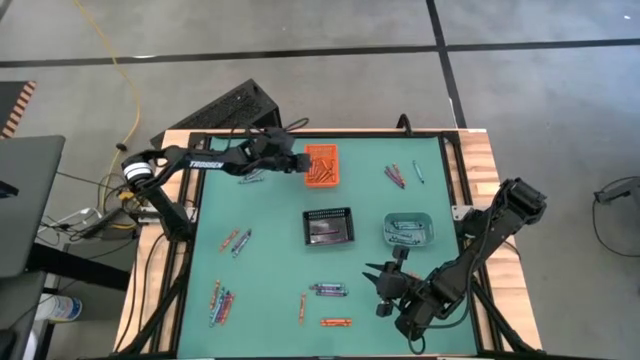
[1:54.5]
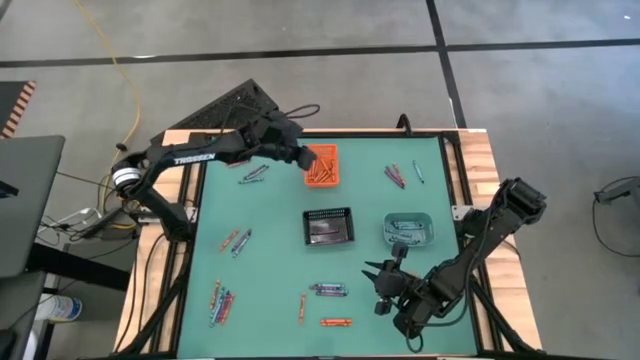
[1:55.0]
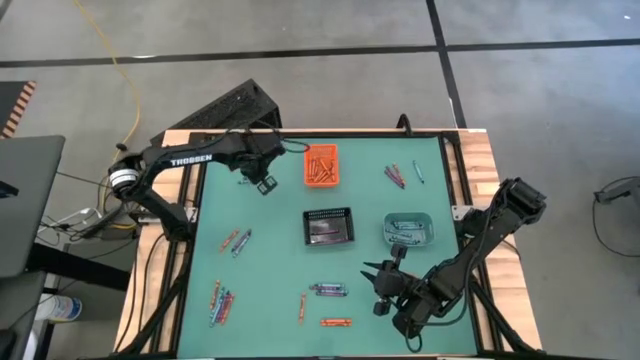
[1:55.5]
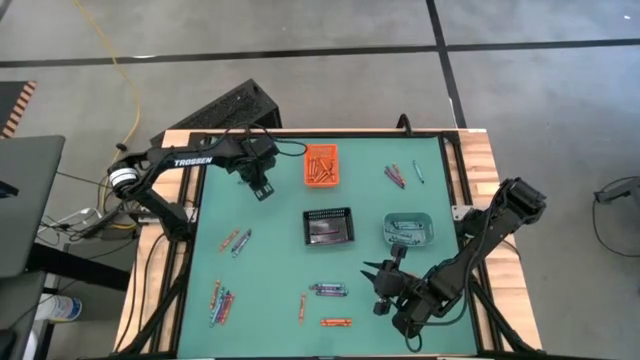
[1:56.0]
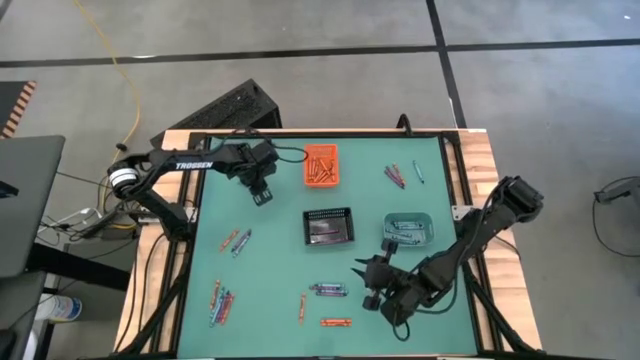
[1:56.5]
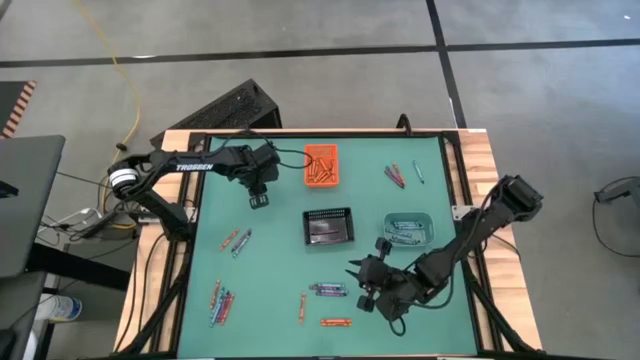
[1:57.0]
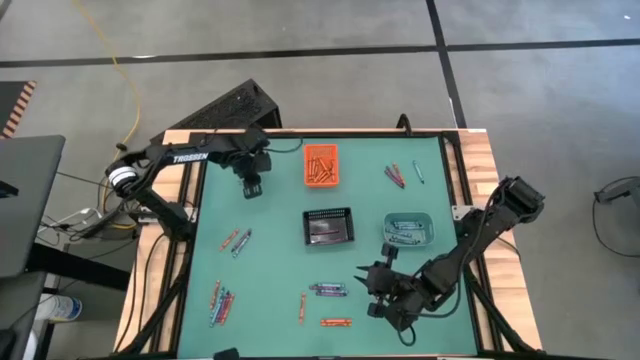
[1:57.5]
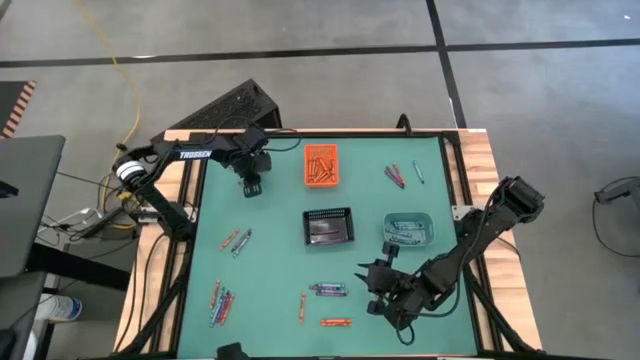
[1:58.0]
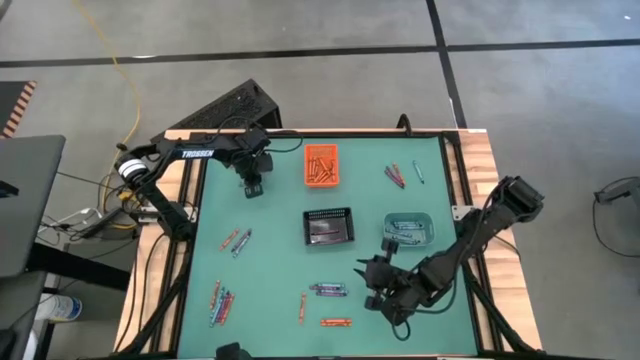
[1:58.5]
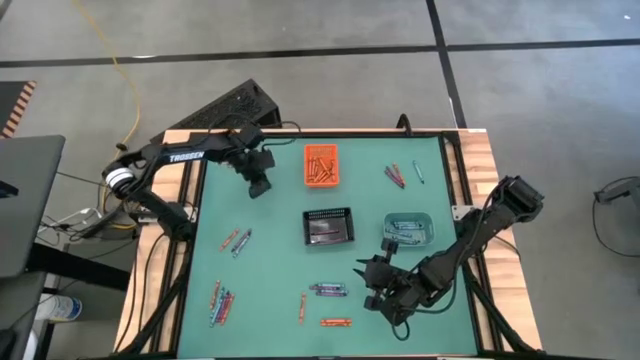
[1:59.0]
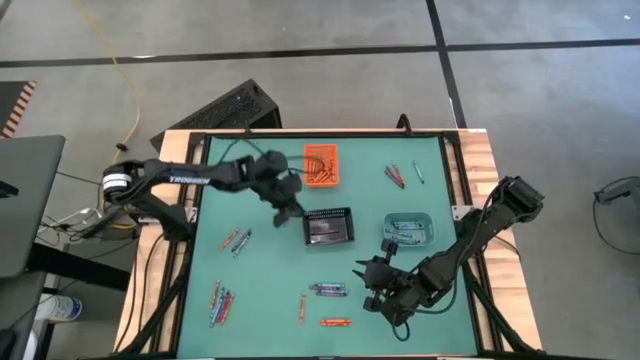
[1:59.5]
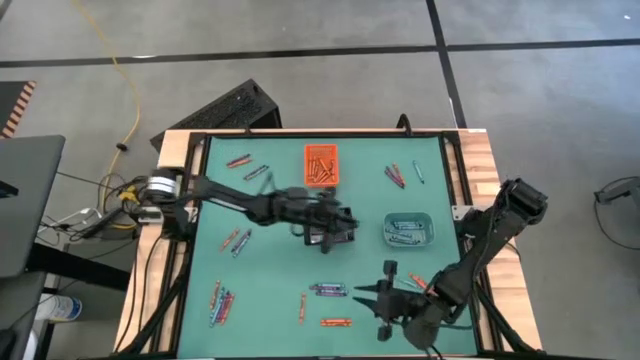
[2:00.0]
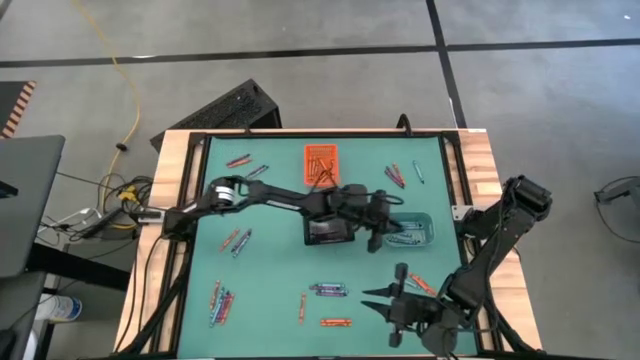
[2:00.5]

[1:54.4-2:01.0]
Task: Sort crayons
Put the blue crayon into the green bin

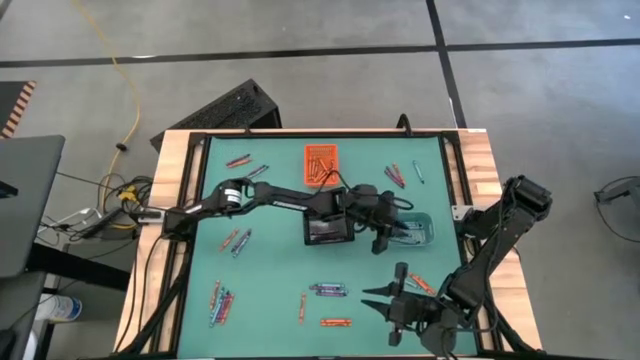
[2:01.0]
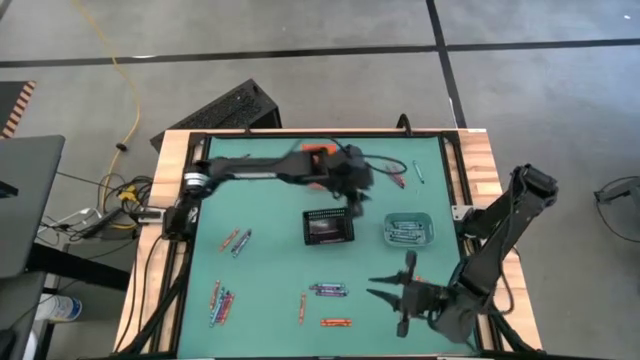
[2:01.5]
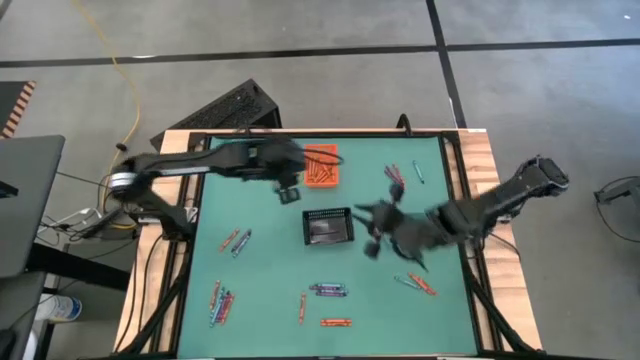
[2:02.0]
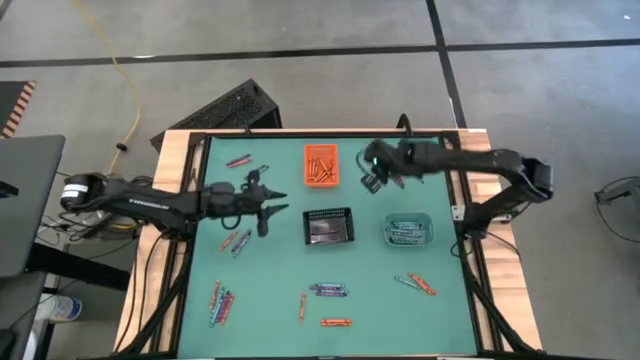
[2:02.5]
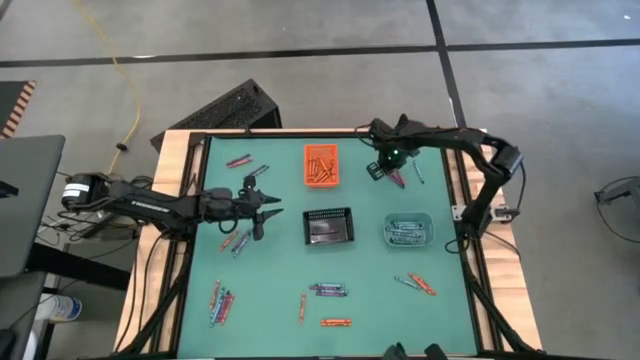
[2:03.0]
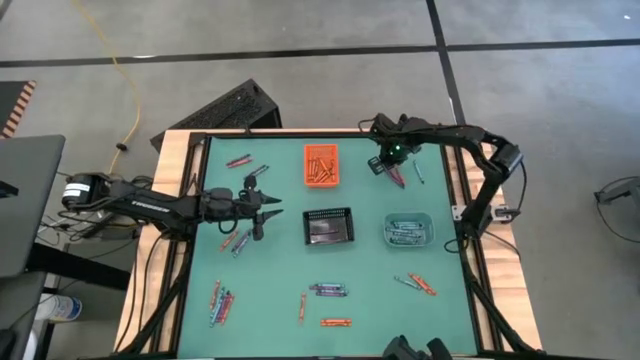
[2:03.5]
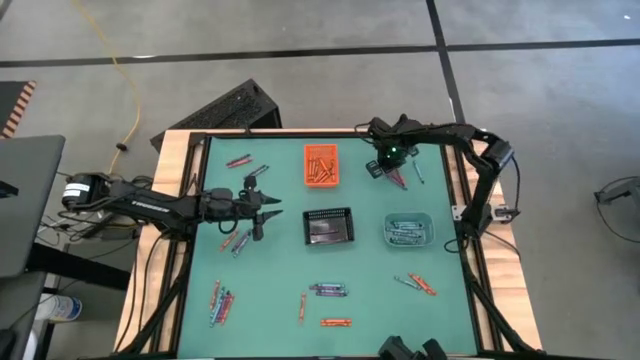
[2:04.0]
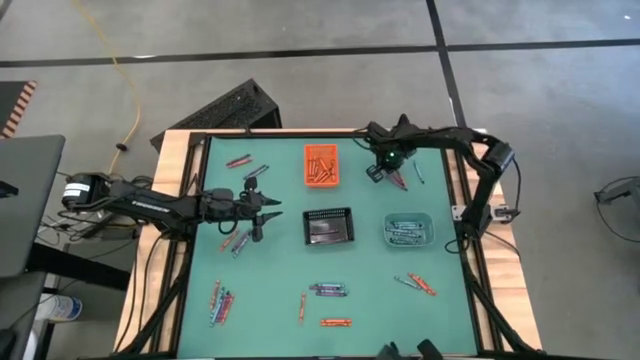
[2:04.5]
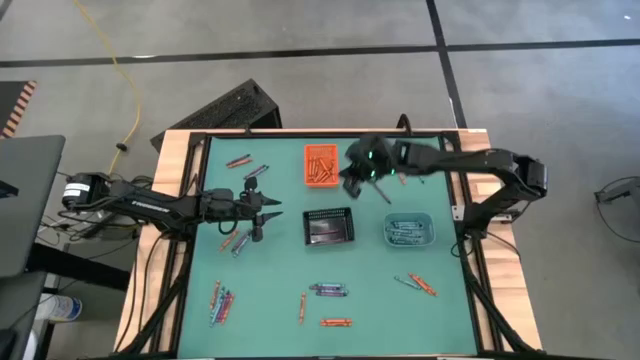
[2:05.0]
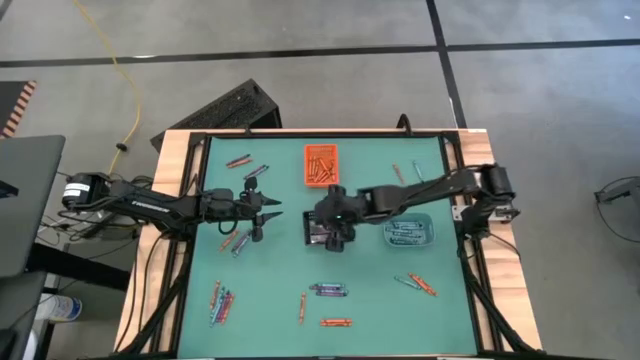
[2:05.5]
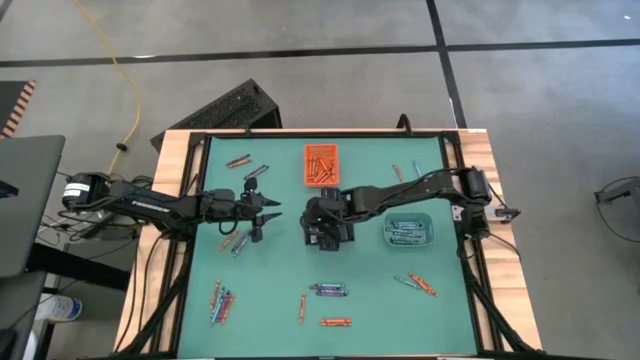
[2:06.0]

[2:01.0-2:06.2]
Put the violet crayon into the black bin

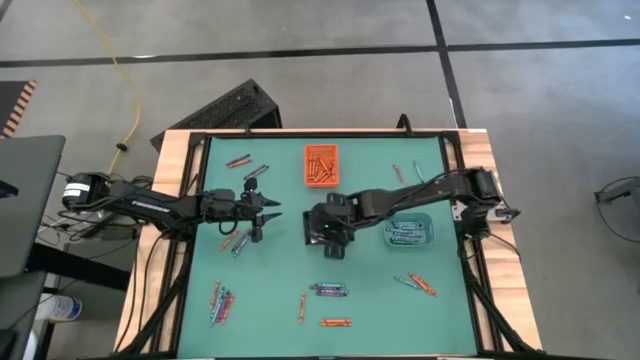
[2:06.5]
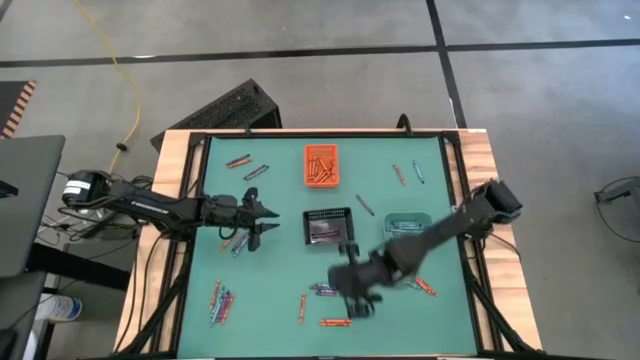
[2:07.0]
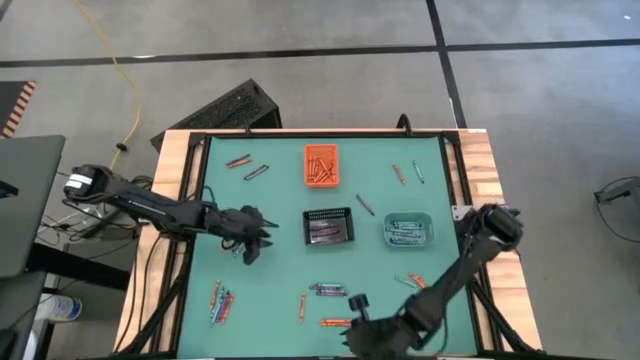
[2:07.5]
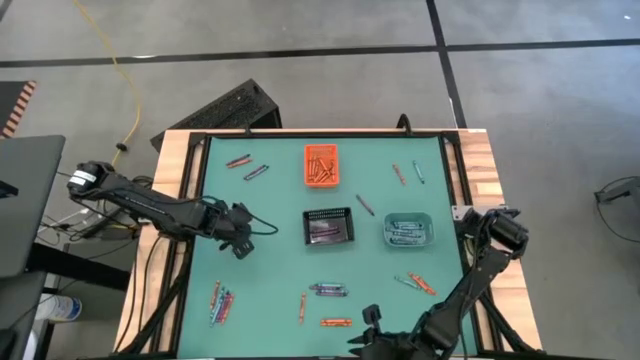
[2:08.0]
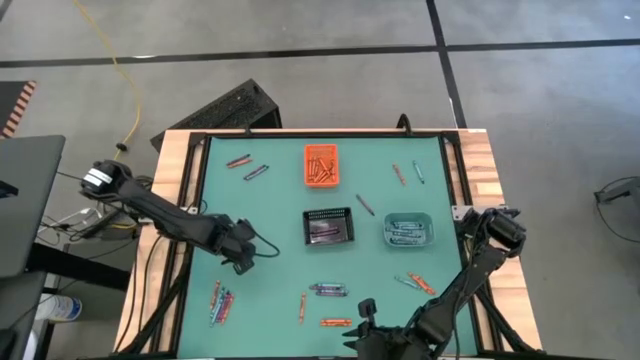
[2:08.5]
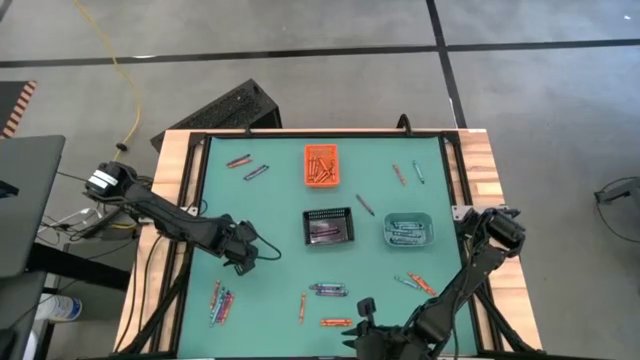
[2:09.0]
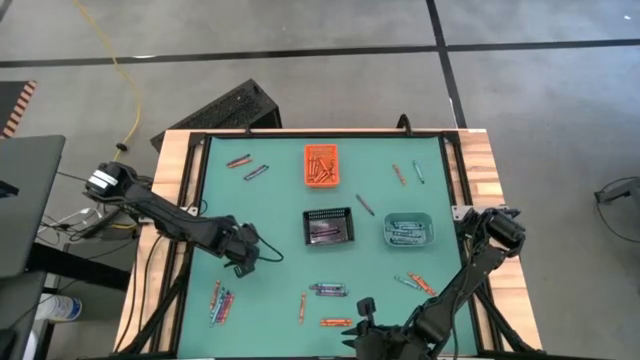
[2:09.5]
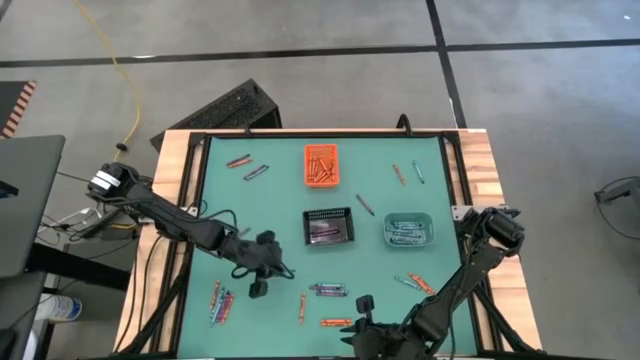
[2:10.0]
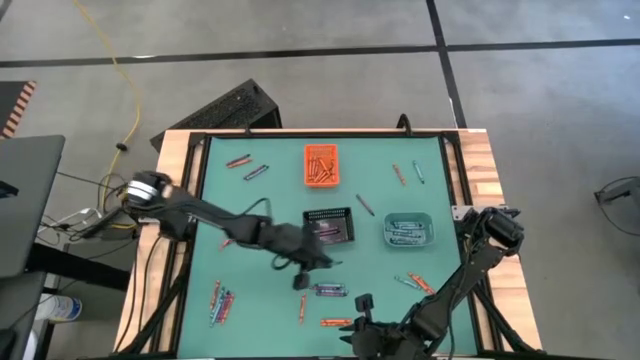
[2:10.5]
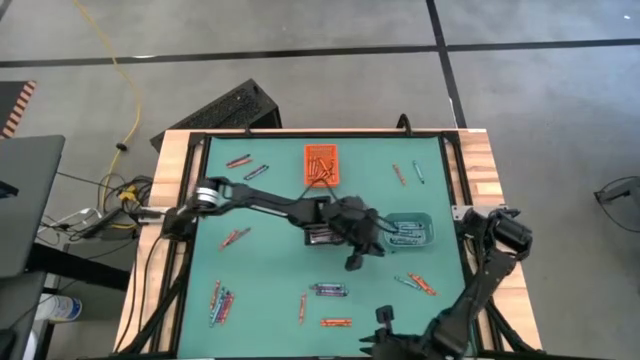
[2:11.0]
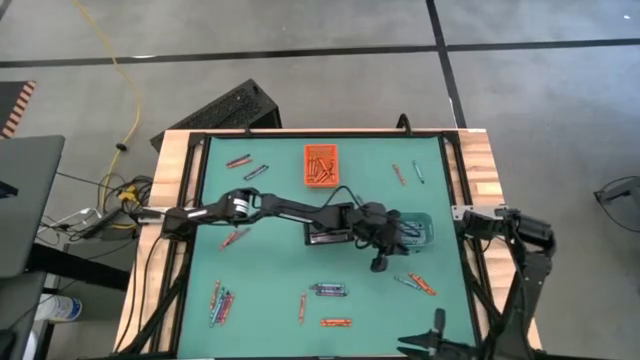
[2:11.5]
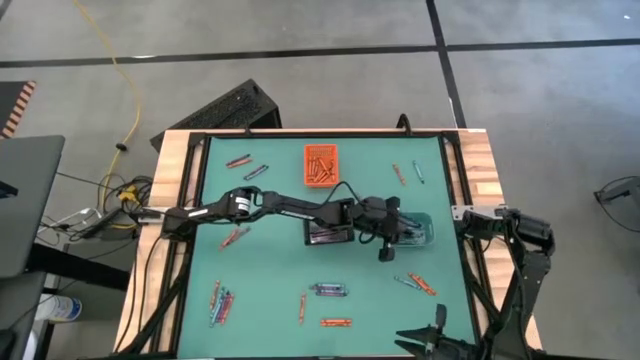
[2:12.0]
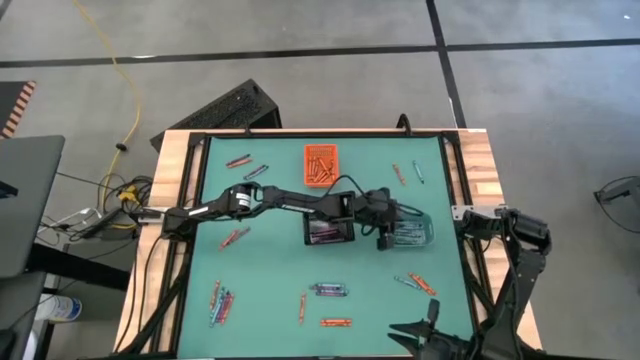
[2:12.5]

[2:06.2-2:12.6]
Put the blue crayon into the green bin

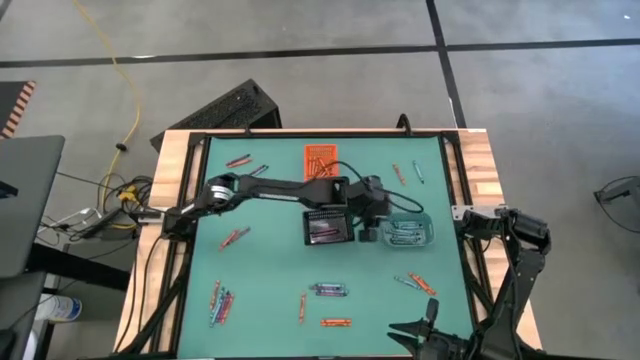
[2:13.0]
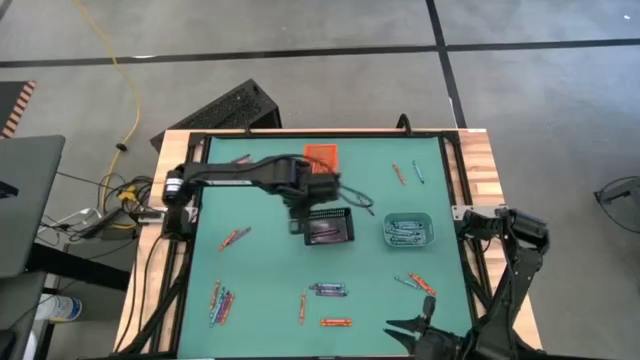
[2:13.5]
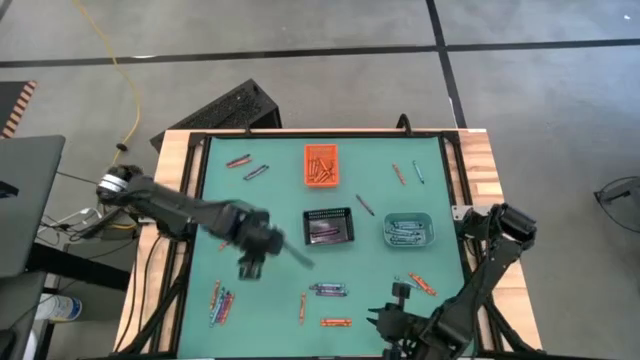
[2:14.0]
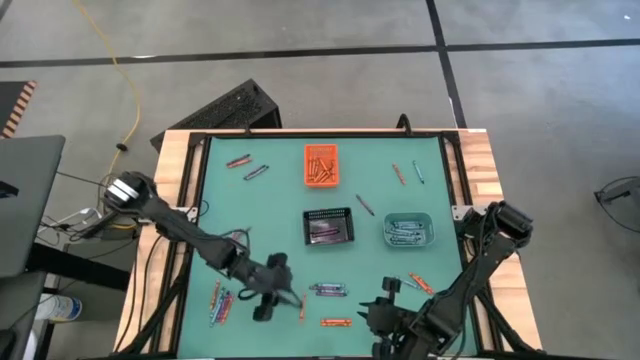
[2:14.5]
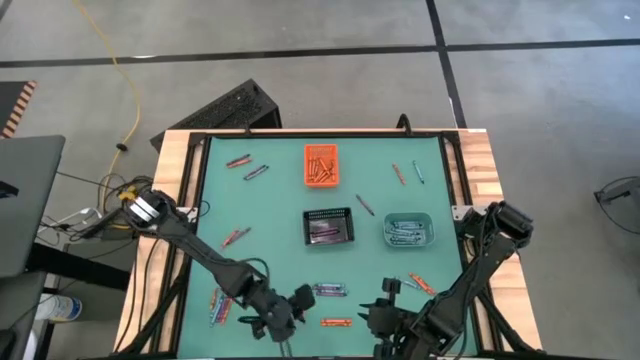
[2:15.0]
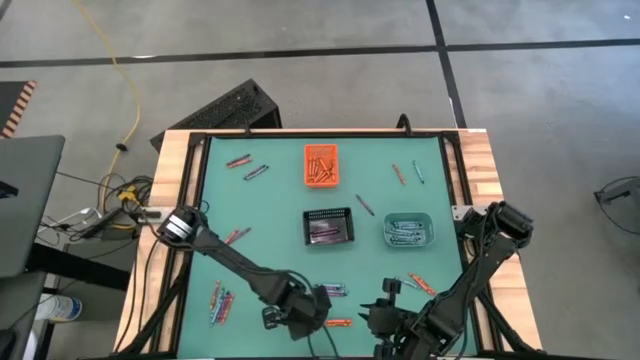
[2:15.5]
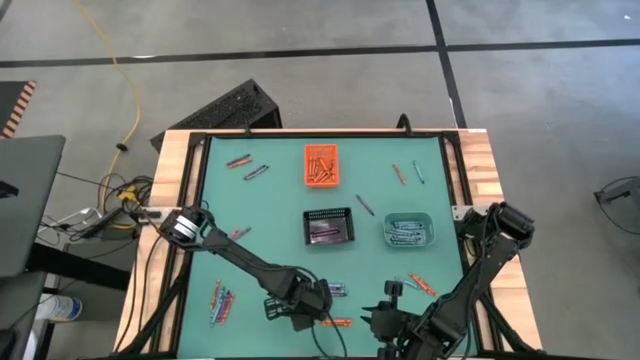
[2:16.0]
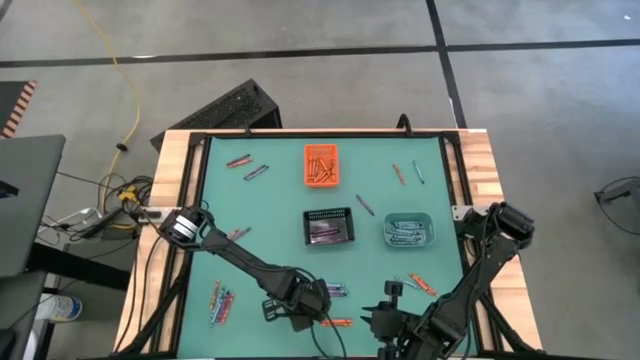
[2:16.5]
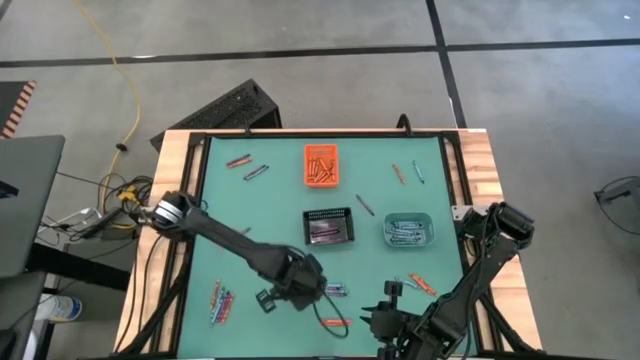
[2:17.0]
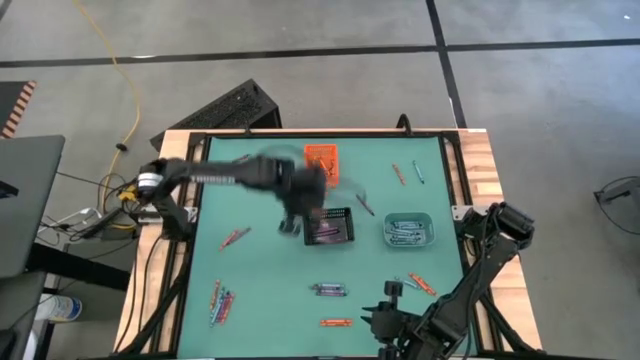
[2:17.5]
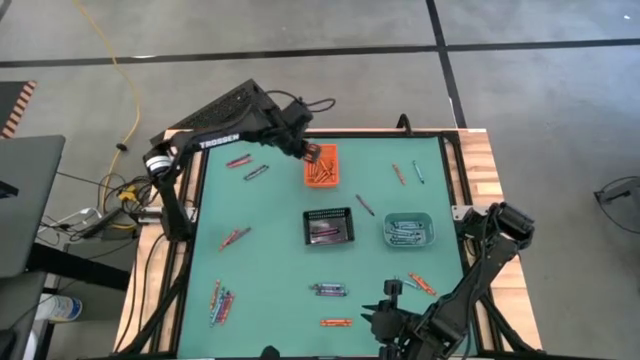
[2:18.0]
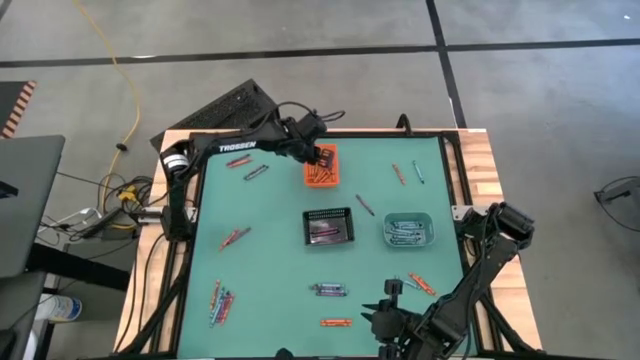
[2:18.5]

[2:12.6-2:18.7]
Put the orange crayon into the orange bin
